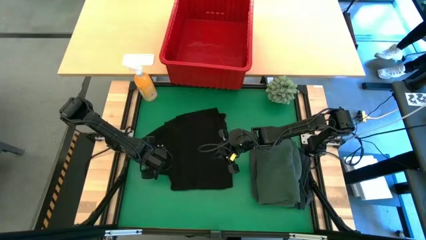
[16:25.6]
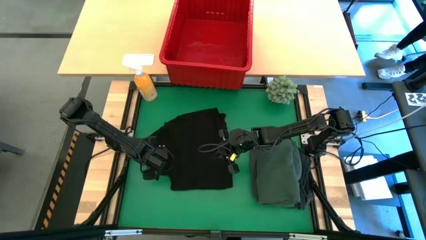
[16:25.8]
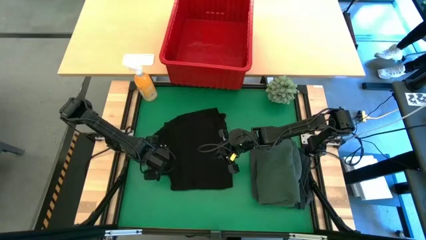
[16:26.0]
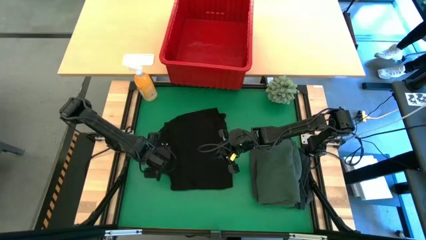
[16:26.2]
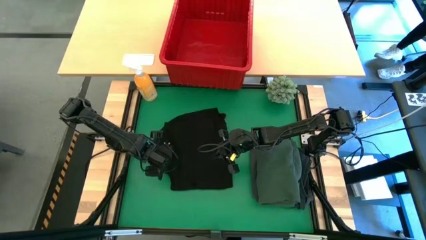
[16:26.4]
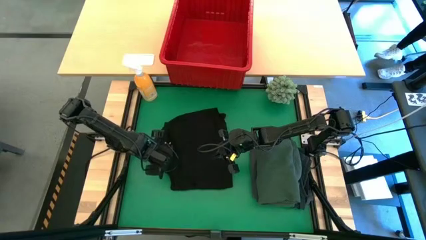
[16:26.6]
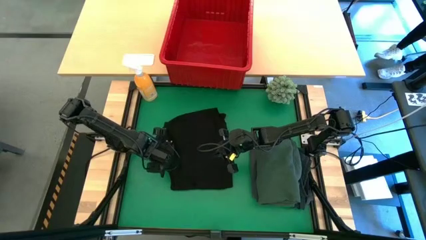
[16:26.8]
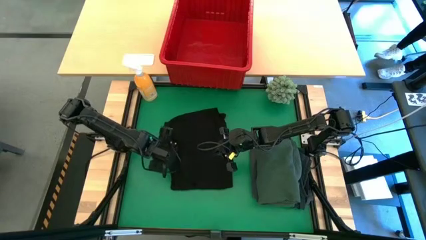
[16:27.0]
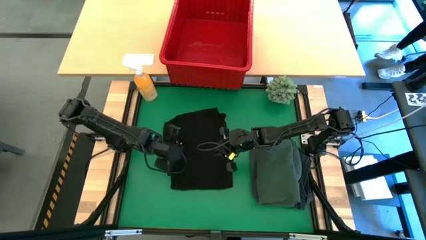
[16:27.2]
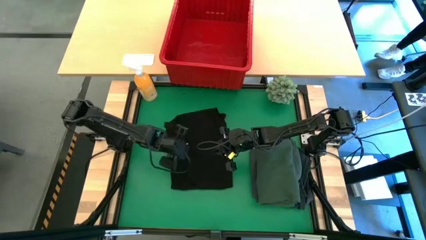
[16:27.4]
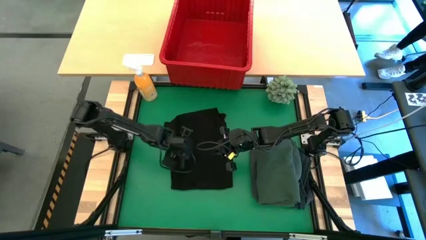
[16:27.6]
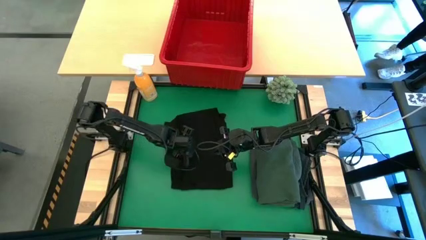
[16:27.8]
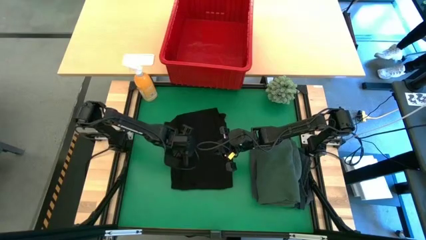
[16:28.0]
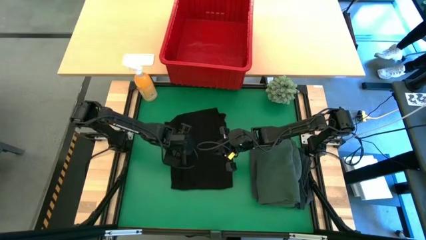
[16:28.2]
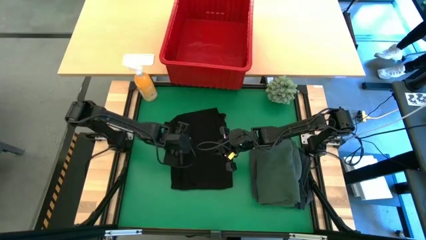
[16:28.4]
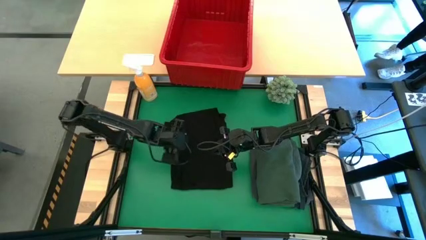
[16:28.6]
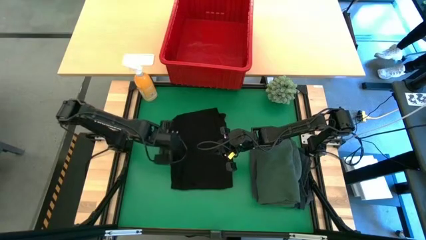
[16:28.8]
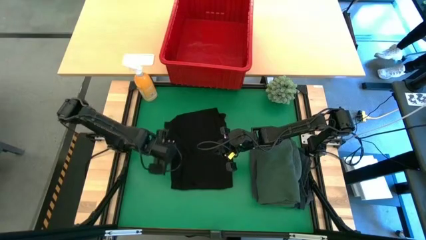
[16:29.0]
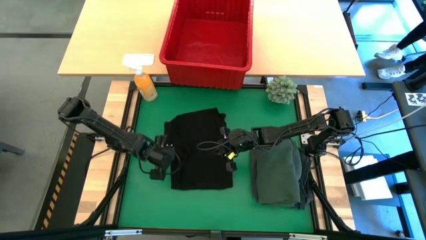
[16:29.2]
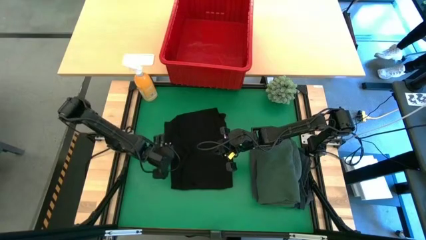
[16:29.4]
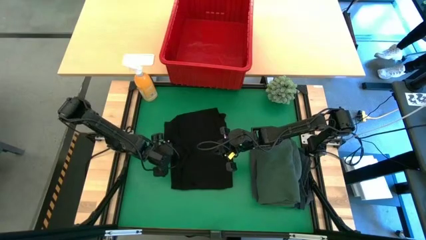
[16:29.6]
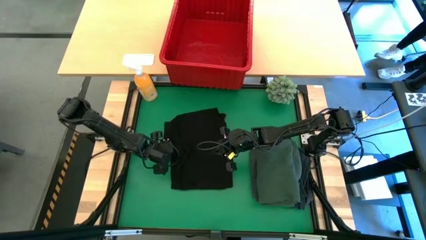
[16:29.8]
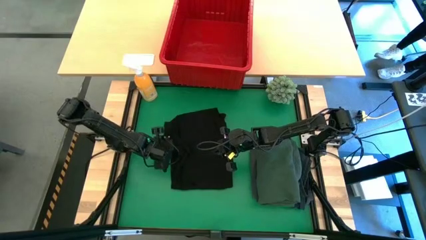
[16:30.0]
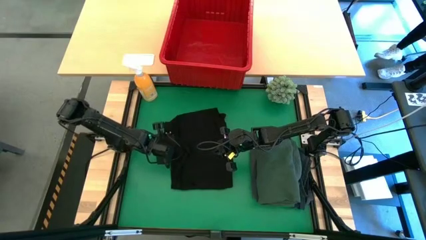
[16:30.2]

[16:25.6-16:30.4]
Task: Fold Laundry from Bin
Fold the black shirt

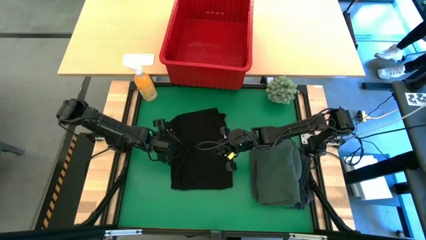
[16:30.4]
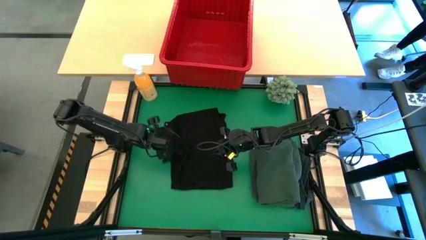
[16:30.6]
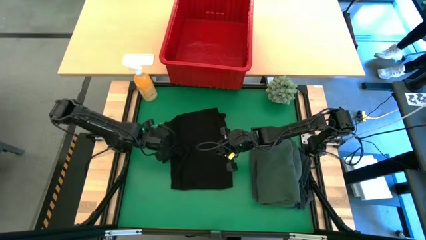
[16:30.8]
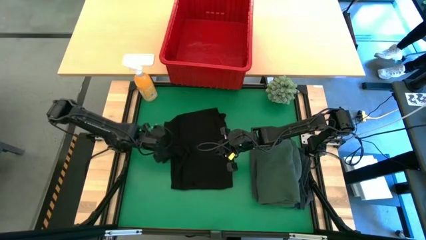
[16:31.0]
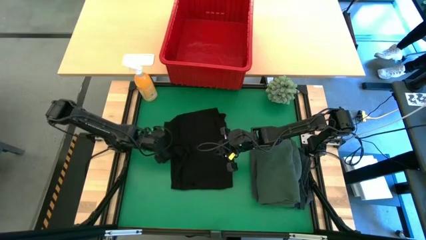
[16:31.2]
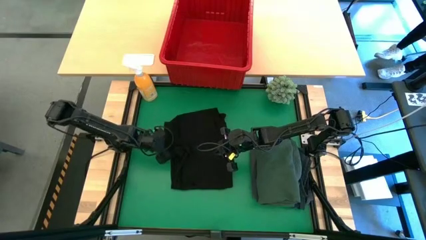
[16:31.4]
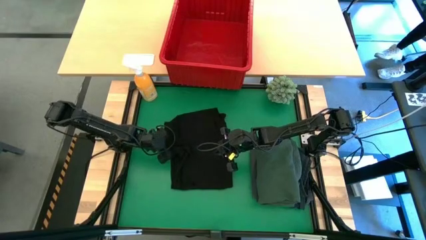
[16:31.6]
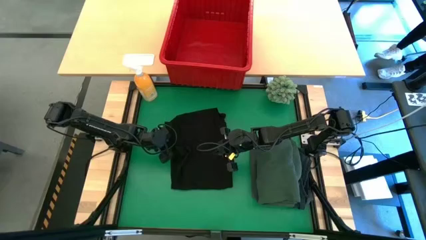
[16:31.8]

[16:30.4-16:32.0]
Fold the black shirt

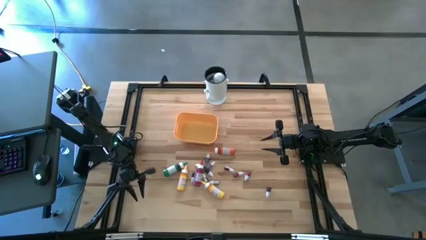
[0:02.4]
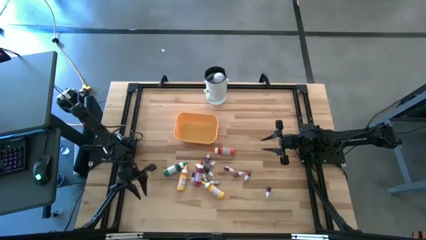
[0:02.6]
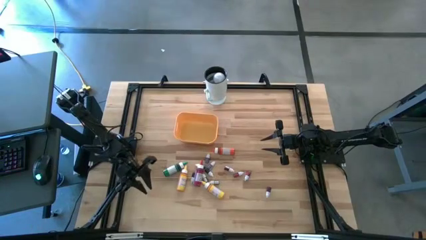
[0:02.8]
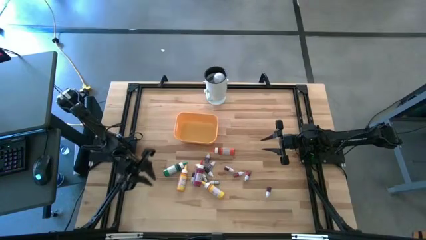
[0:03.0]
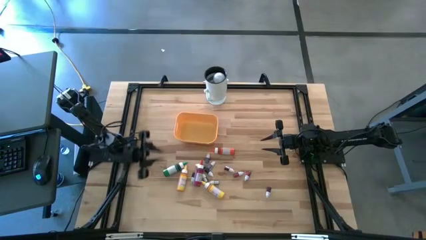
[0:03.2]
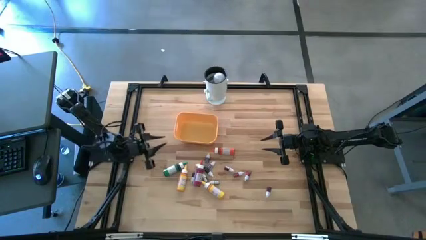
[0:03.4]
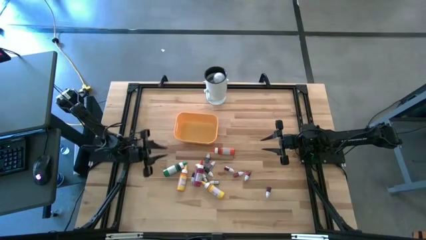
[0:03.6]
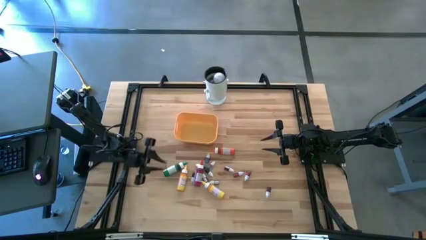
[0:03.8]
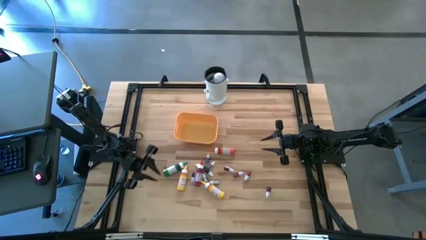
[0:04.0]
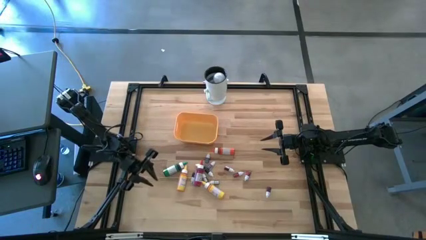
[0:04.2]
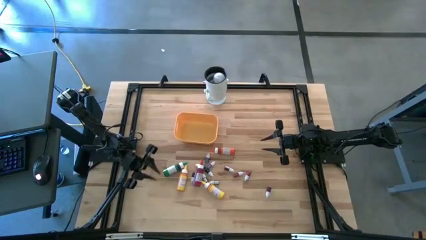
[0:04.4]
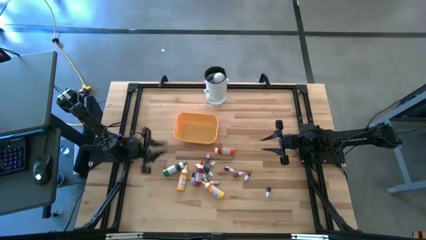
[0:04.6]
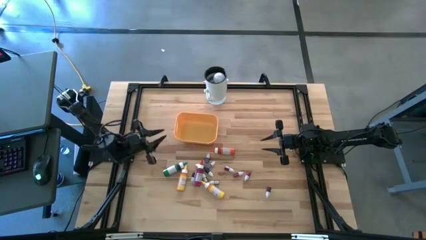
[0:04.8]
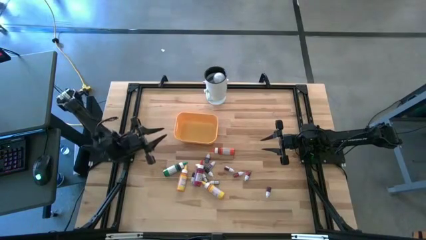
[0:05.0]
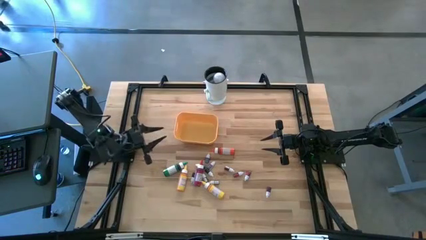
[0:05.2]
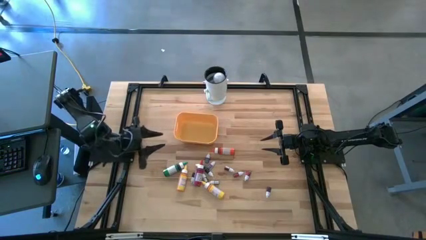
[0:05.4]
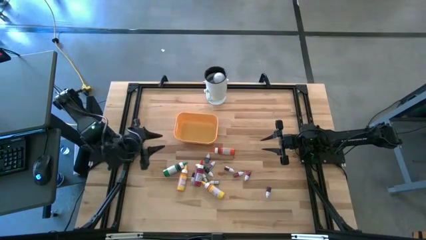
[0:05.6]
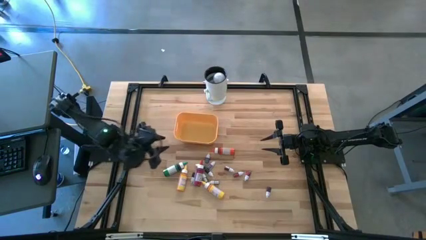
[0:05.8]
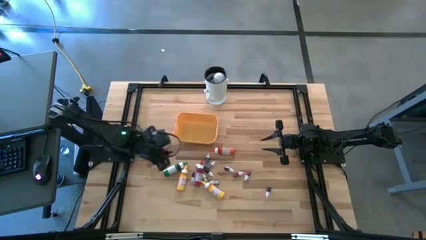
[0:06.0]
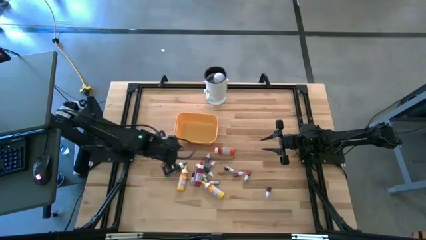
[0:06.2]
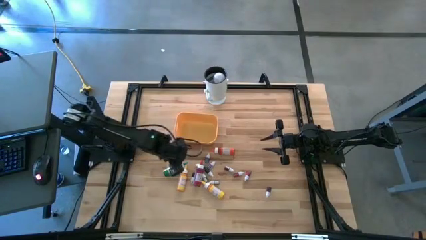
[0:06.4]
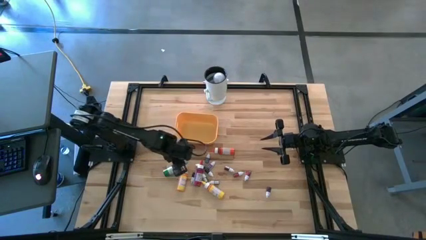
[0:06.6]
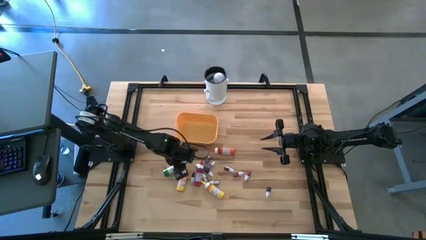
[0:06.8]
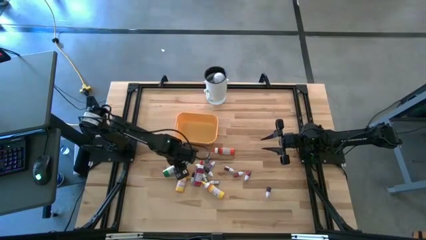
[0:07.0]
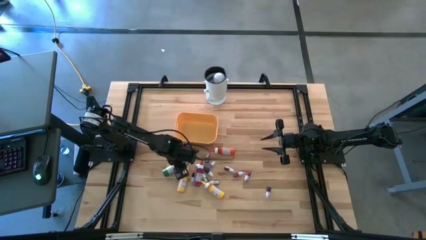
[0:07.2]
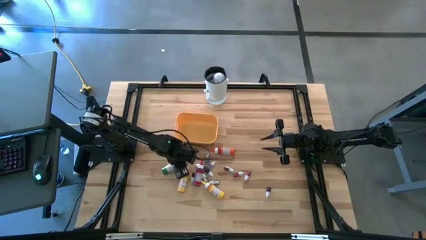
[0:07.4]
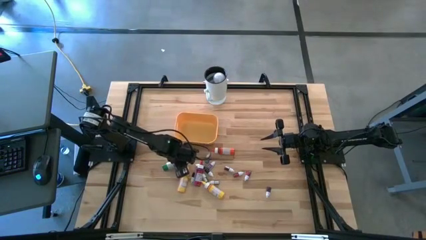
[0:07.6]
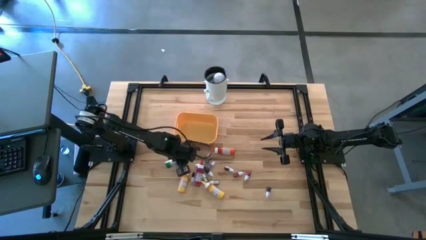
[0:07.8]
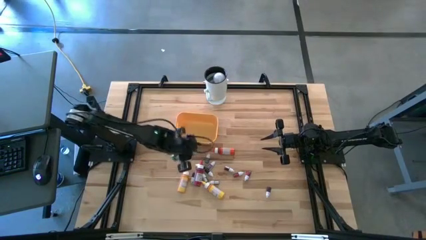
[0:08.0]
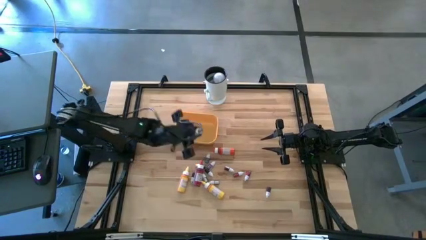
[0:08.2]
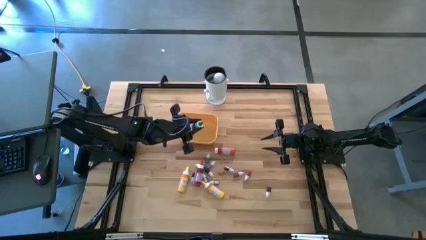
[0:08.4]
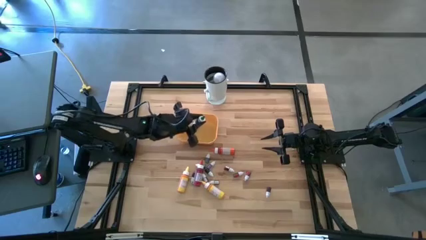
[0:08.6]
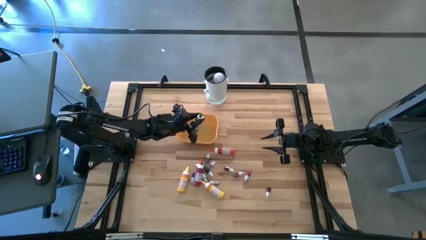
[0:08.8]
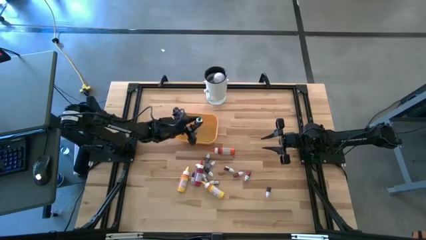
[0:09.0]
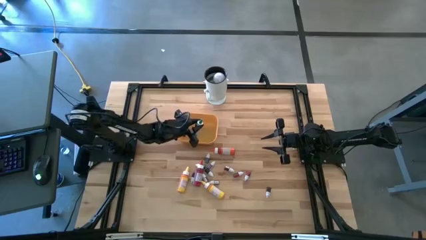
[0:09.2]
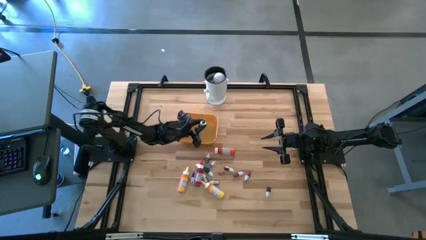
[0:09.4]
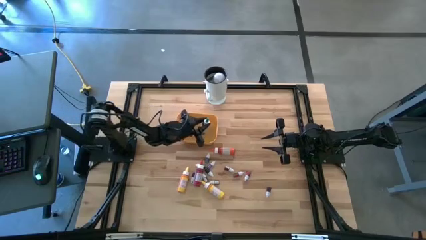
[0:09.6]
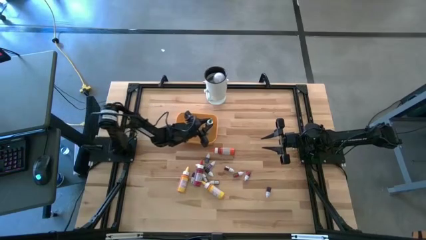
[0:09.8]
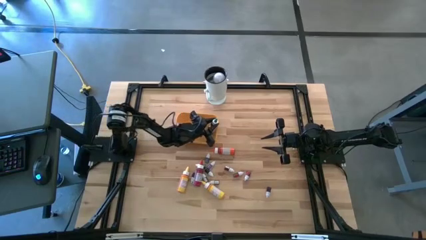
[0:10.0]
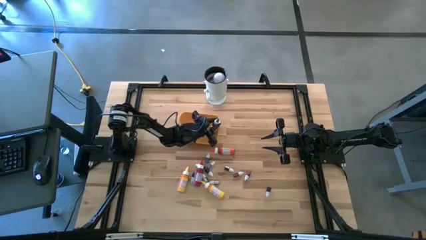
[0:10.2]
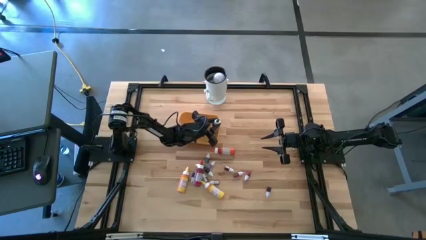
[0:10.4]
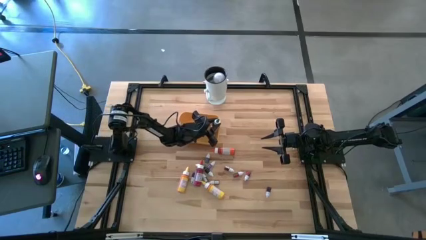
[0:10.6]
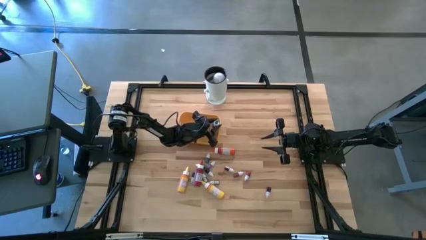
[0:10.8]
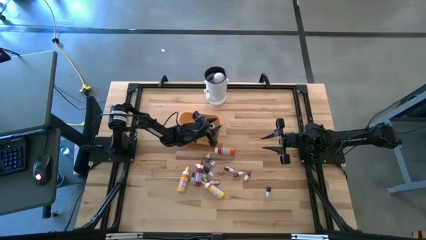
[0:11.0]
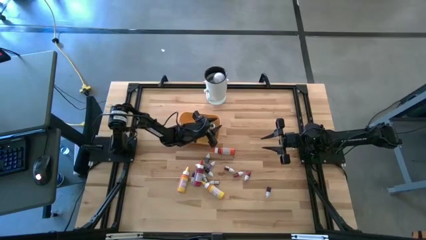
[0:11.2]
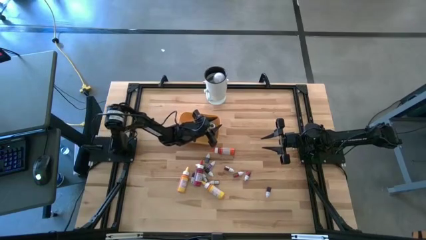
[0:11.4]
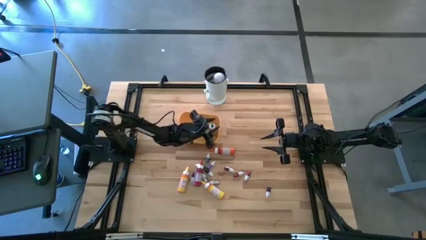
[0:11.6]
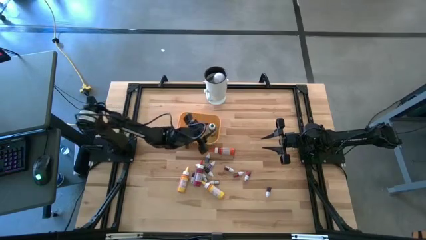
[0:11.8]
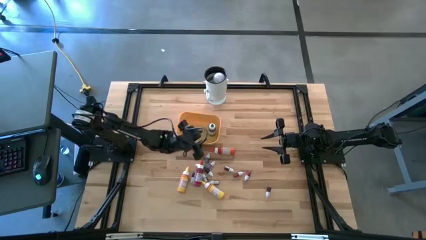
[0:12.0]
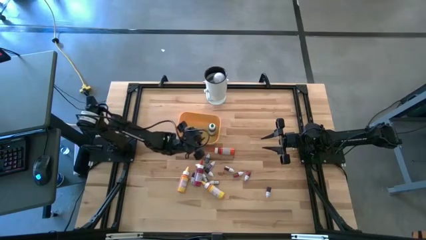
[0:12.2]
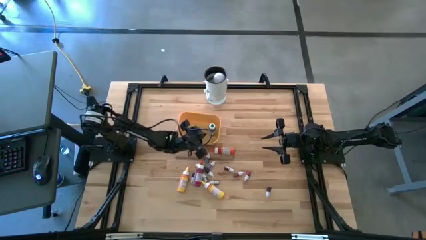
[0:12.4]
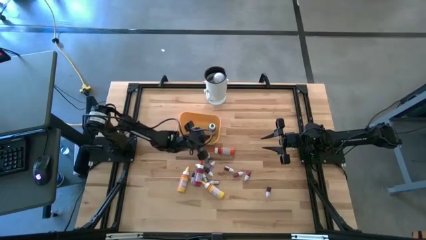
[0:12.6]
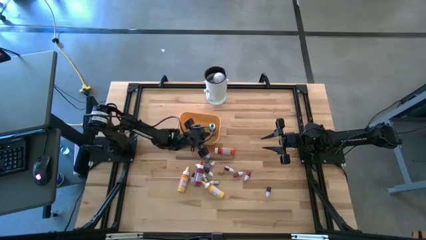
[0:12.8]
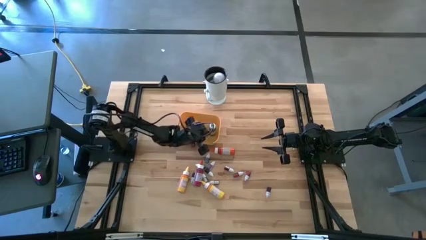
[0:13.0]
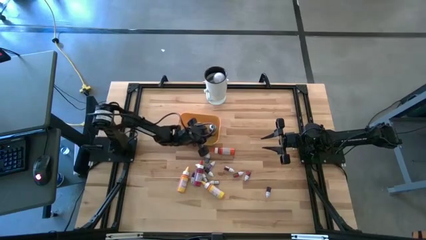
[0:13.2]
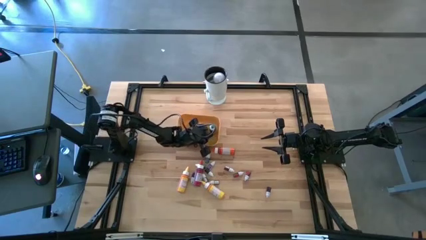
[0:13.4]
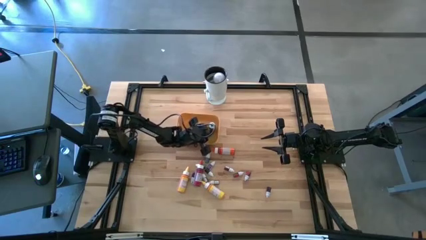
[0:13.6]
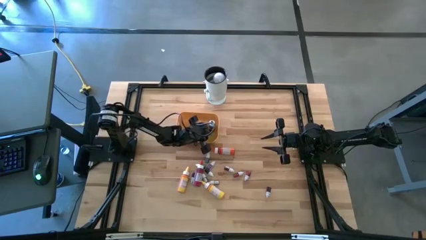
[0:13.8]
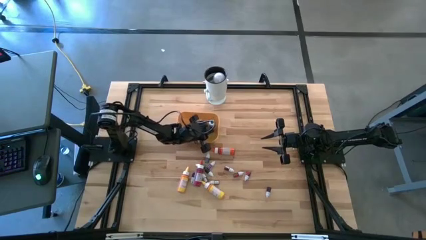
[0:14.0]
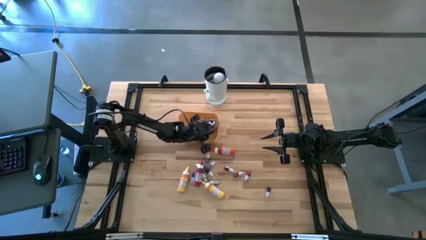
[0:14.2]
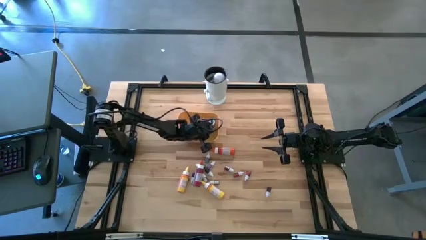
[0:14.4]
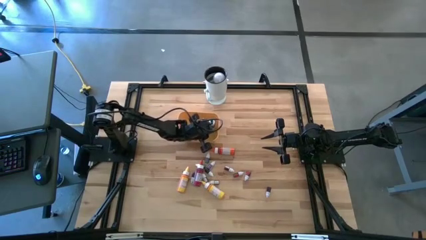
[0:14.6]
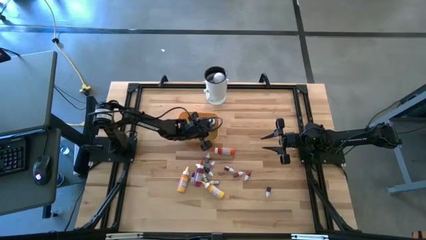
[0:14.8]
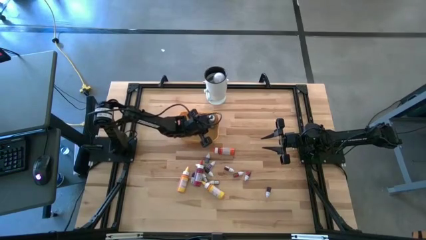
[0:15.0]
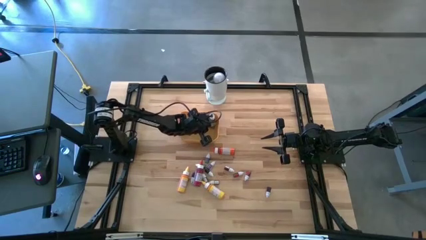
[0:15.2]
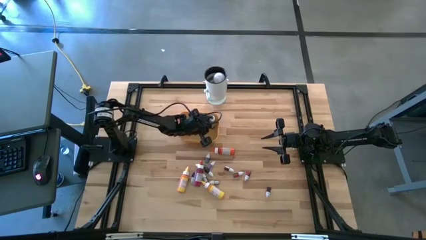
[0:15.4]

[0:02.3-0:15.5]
Task: Pick & Place food coloring
Put the large green food coloring bottle into the yellow bin
